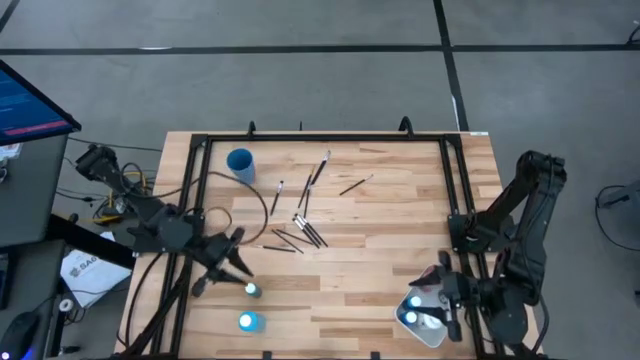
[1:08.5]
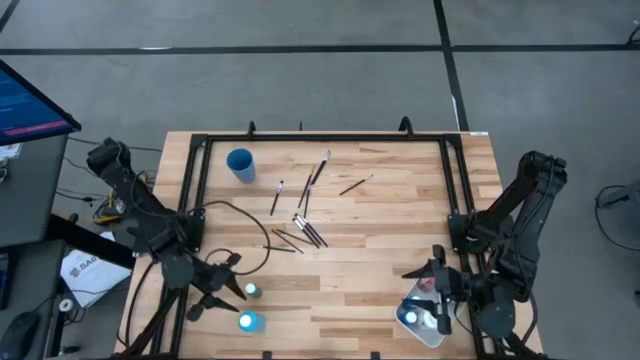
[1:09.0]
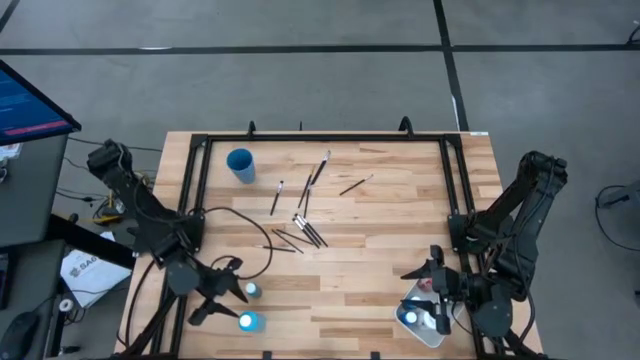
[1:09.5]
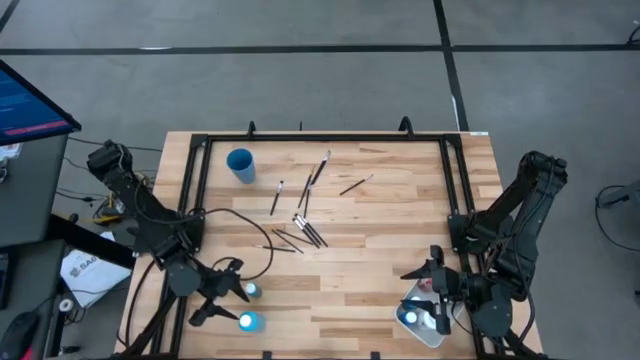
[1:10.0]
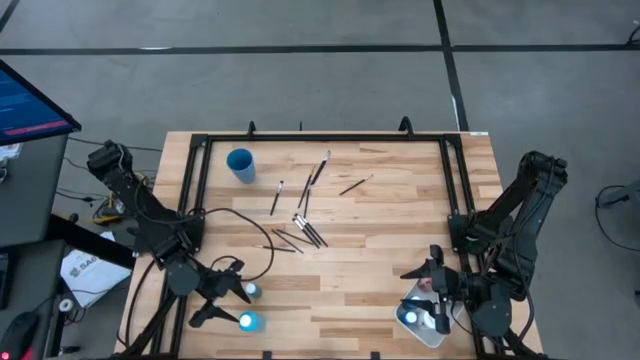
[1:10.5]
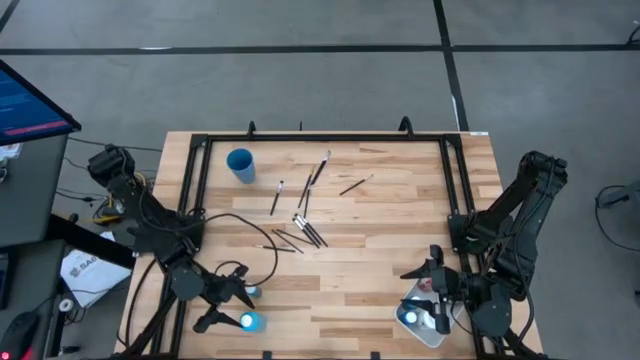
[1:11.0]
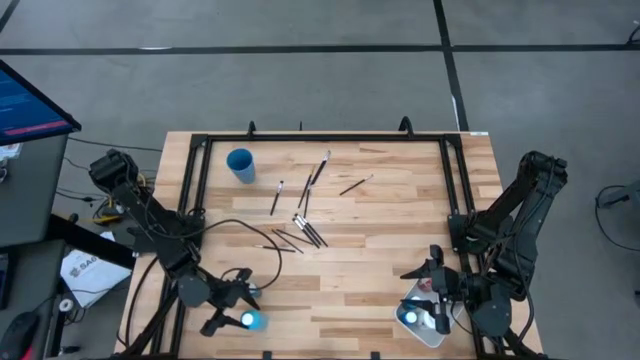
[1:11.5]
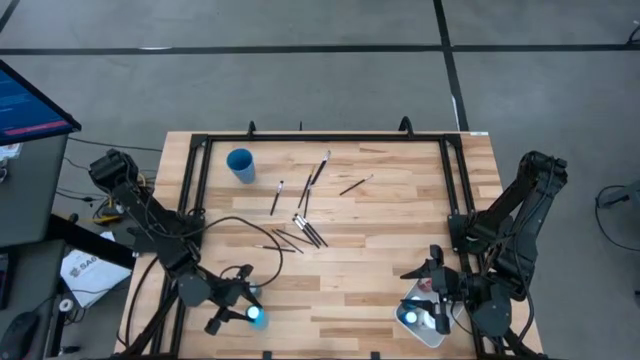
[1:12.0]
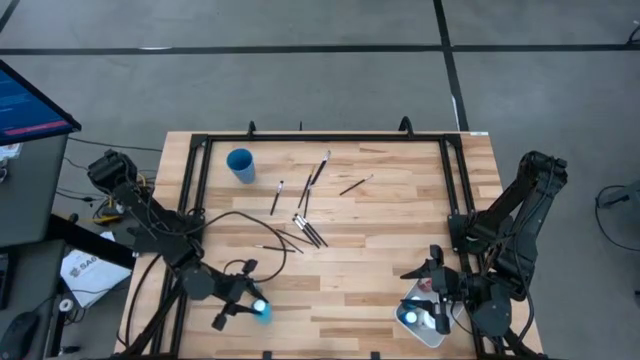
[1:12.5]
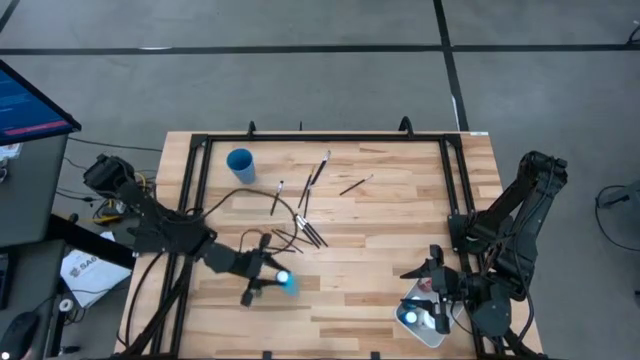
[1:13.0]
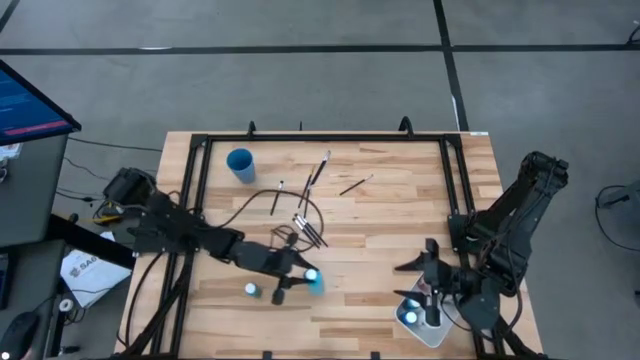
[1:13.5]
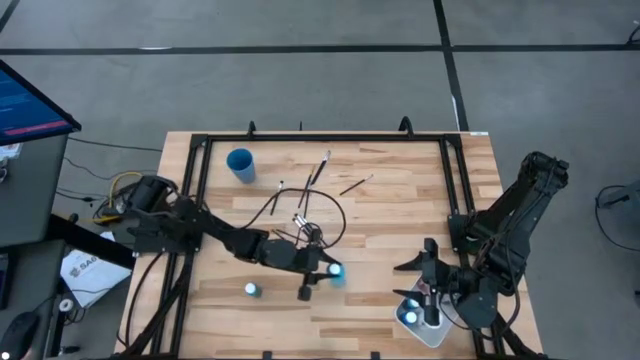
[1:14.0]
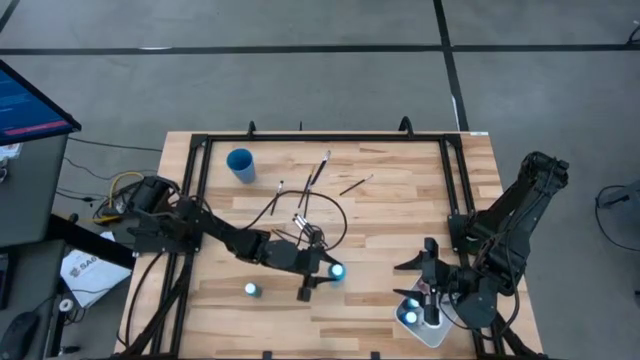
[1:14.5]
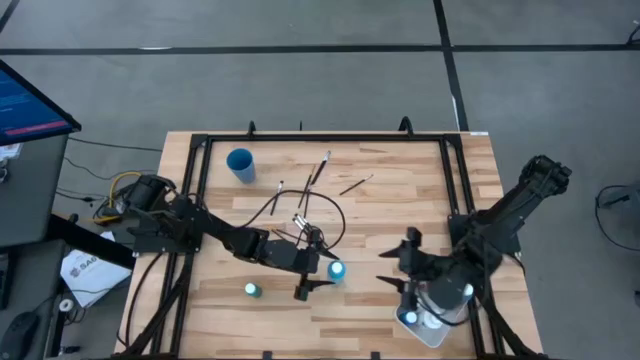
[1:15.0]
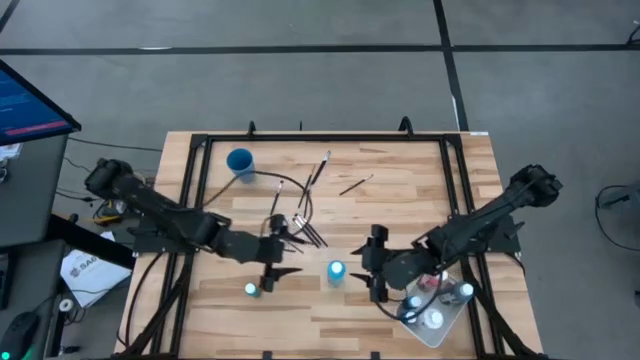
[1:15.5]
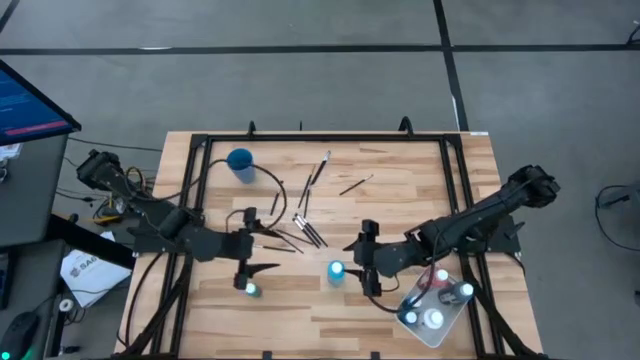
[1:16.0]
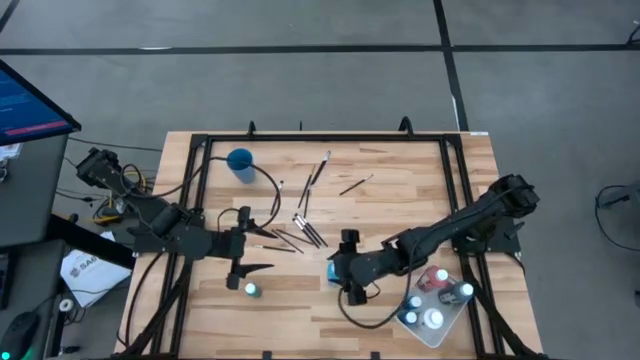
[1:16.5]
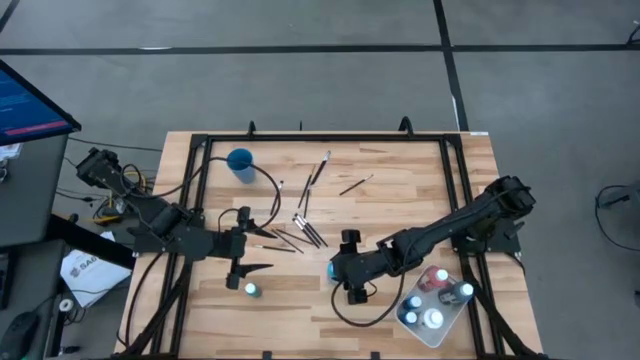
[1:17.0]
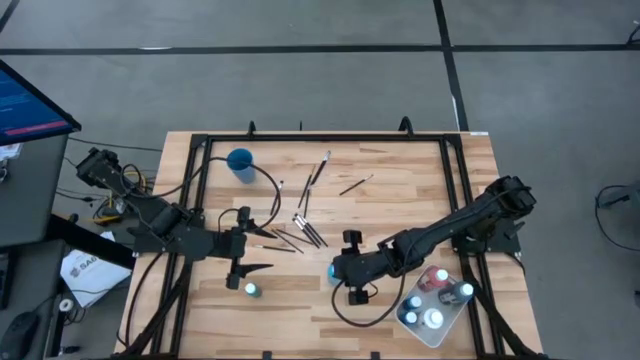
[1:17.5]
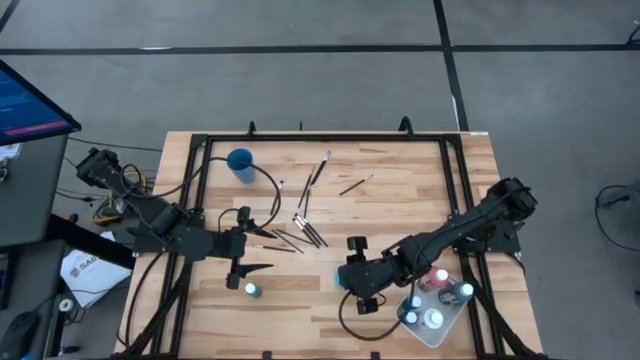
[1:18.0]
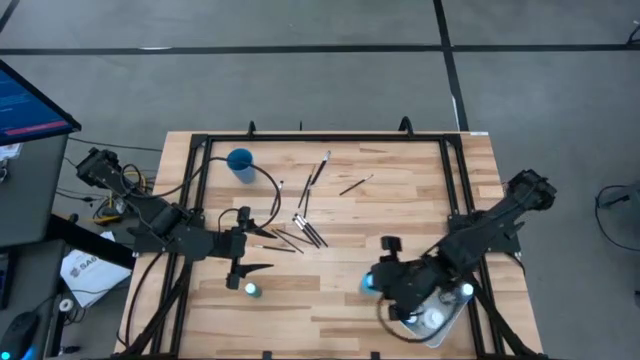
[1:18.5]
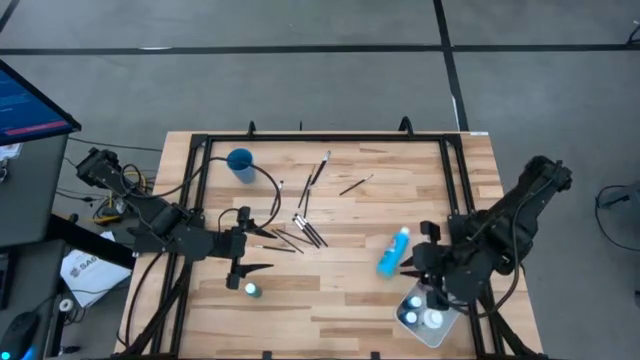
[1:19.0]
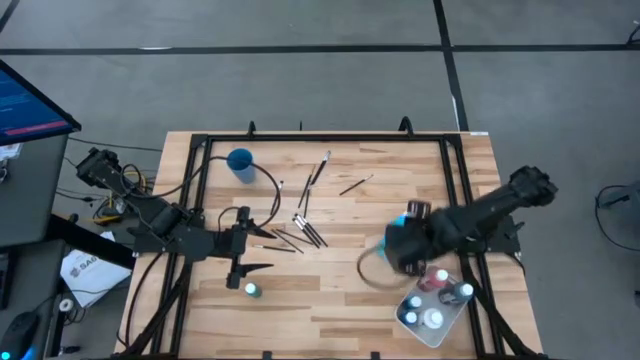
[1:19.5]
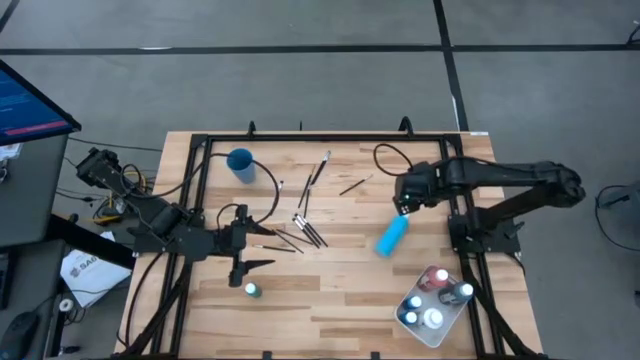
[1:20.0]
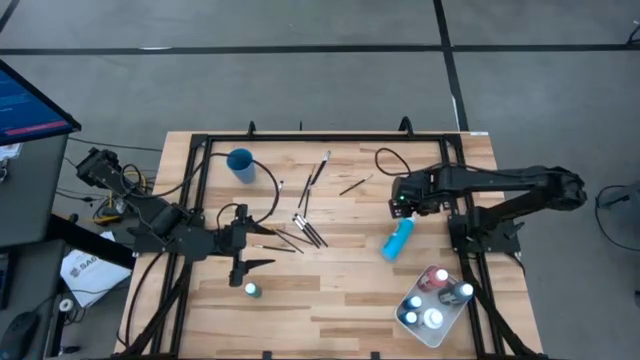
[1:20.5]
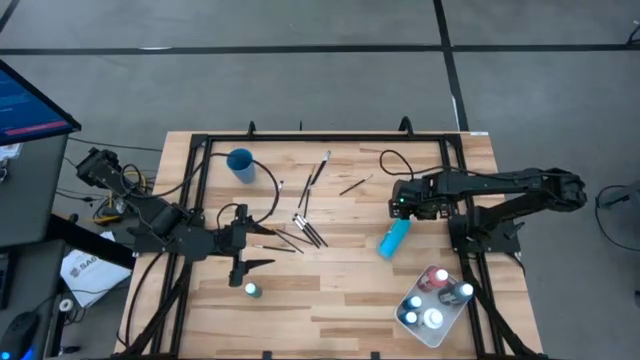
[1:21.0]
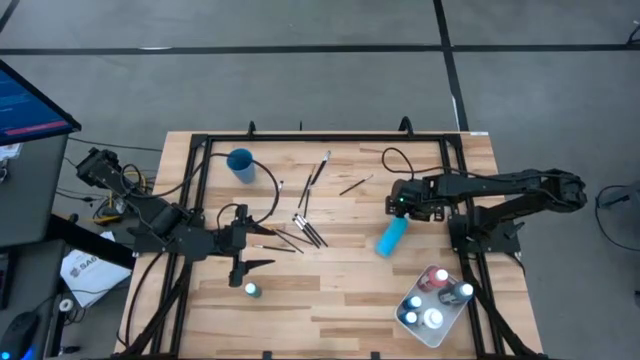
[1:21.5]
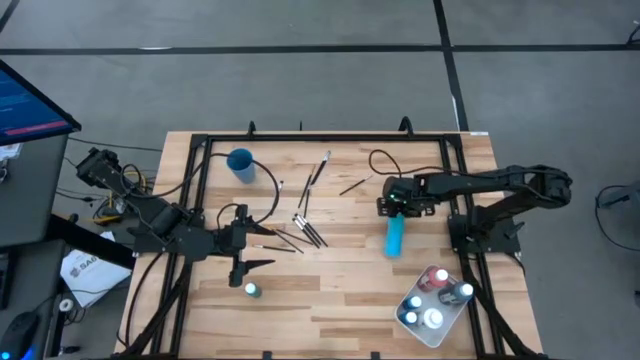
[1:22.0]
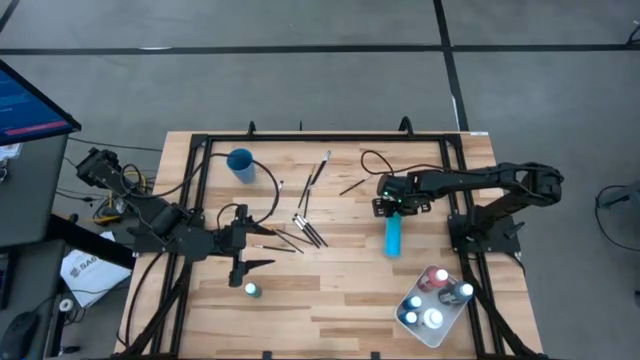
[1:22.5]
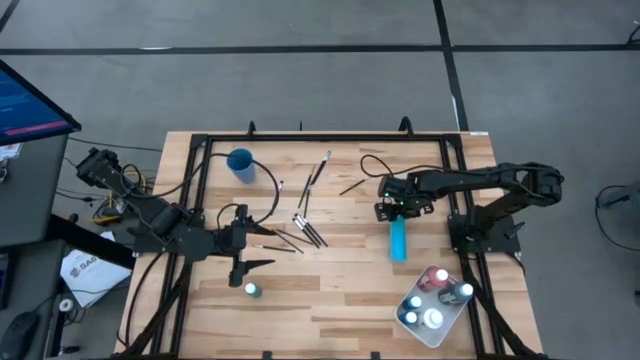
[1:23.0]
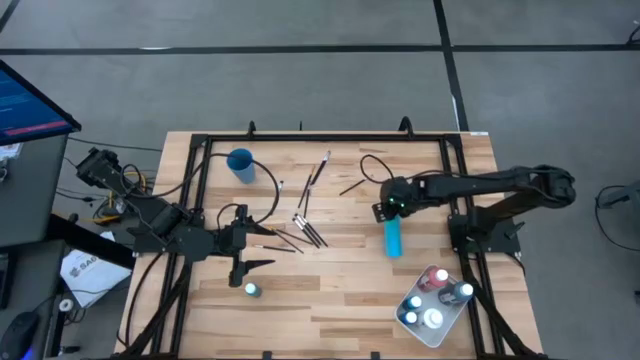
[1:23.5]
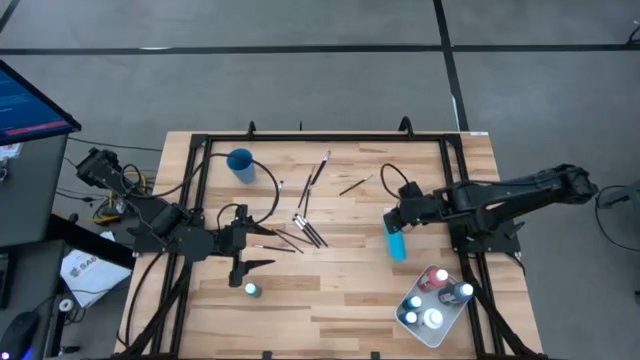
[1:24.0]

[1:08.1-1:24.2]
Task: Pick & Place Paint Supplies
Put the large light blue paint bottle into the white bin

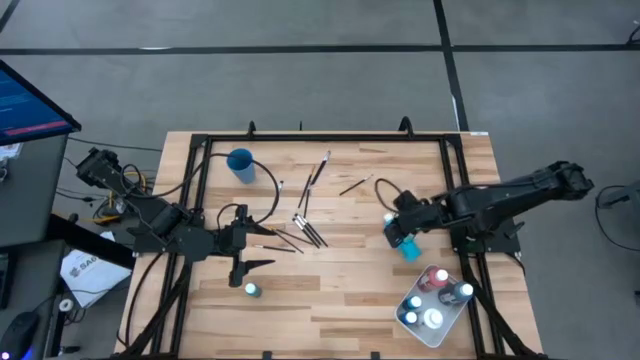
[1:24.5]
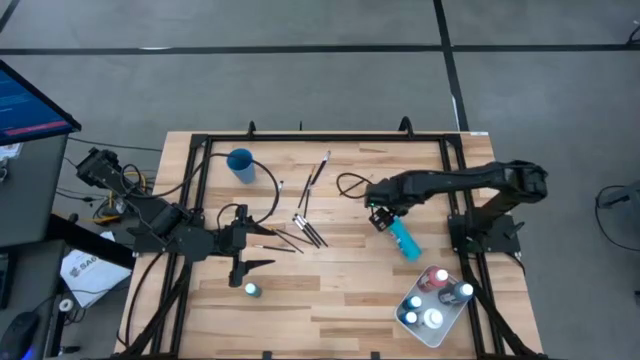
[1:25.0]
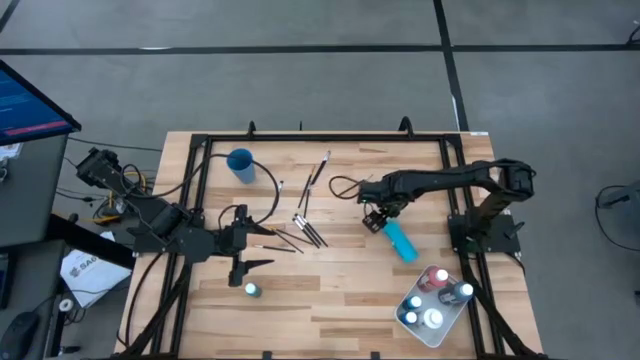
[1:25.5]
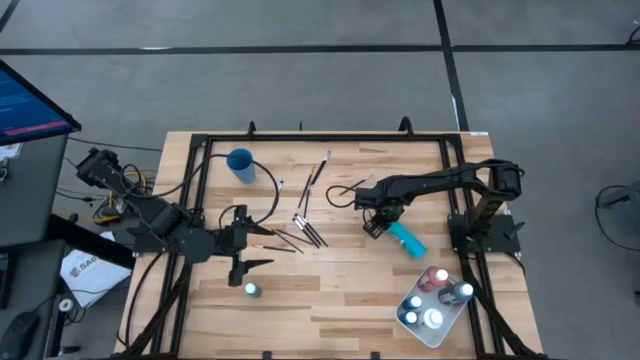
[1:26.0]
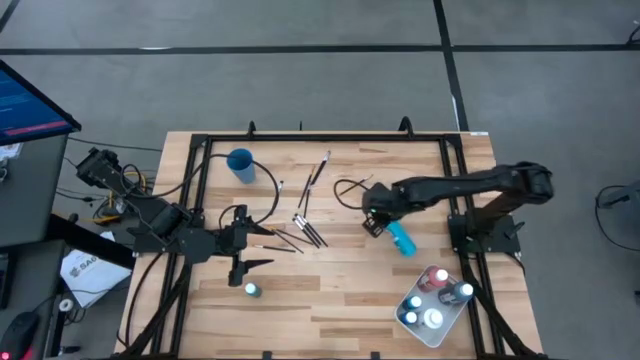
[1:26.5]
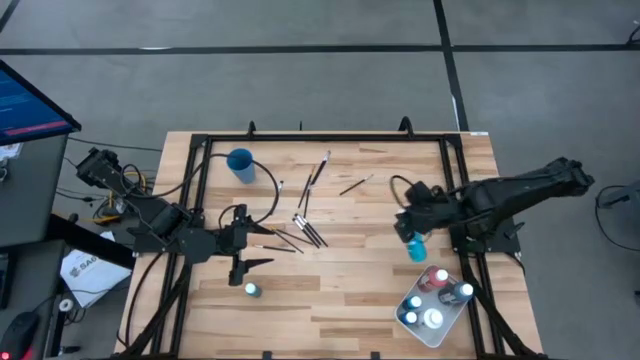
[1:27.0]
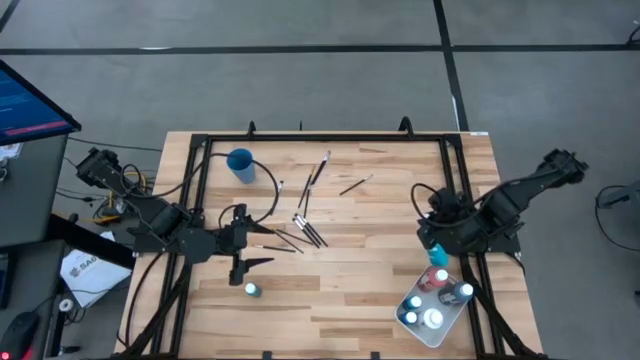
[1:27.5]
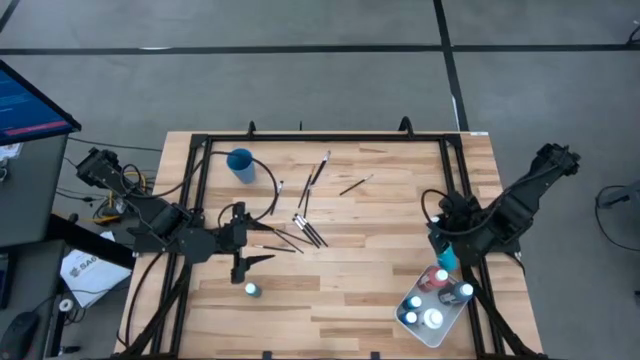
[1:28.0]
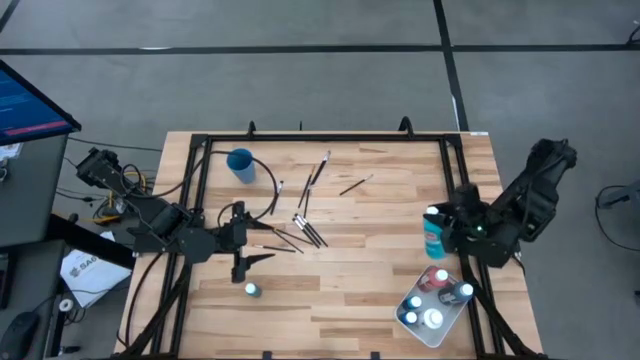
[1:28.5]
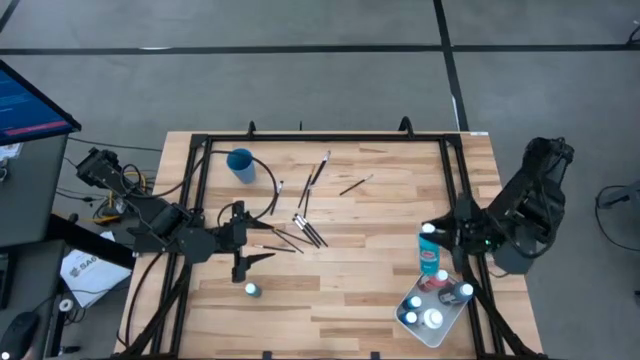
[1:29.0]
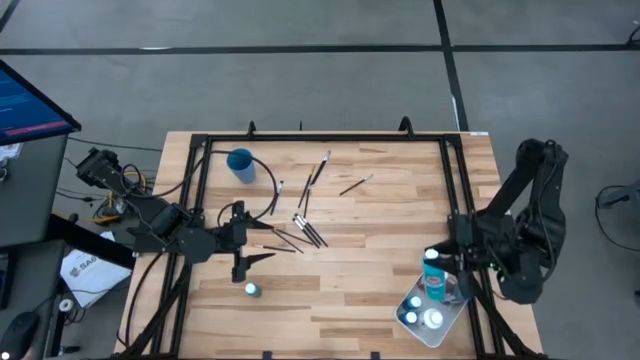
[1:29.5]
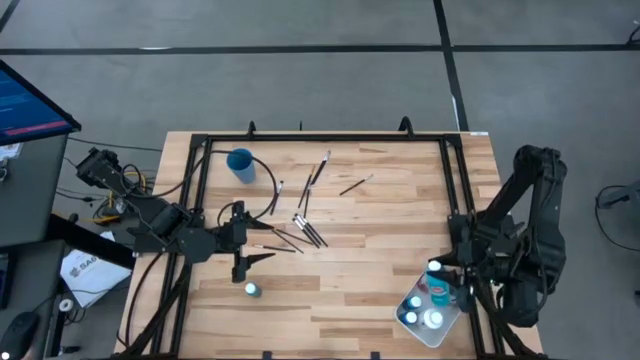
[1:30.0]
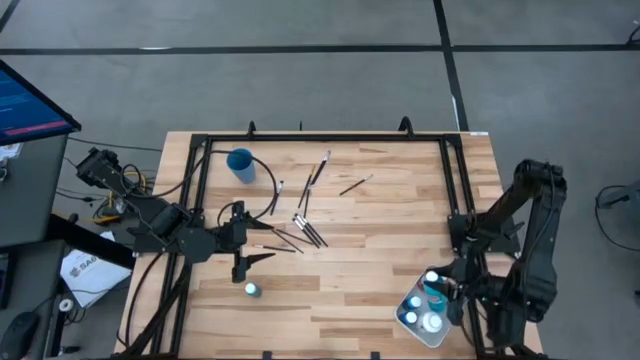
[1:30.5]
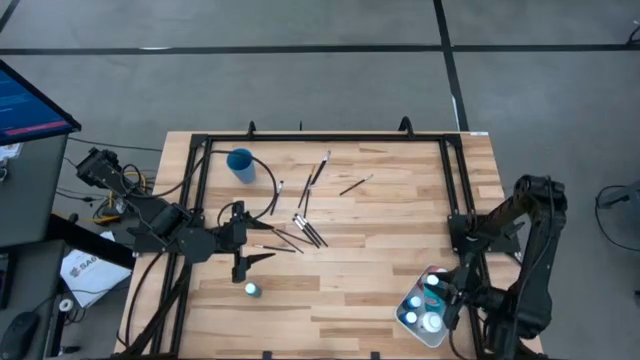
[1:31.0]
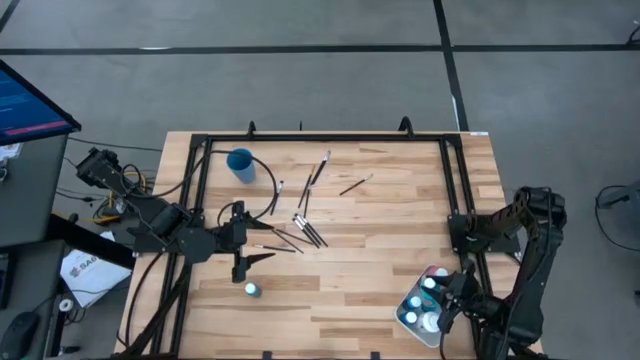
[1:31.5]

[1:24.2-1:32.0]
Put the large light blue paint bottle into the white bin
